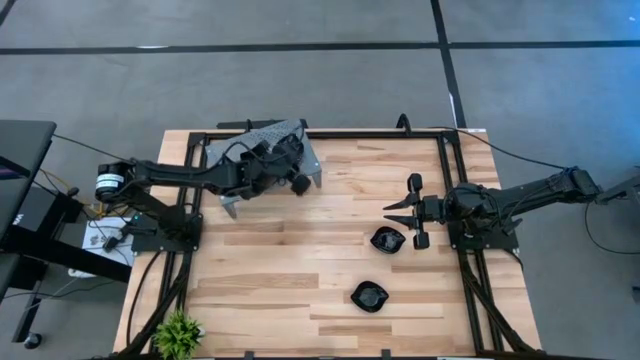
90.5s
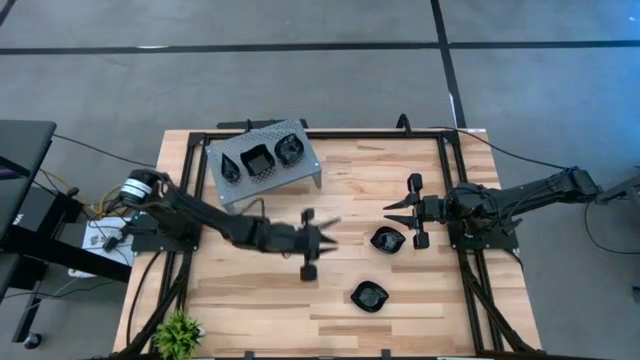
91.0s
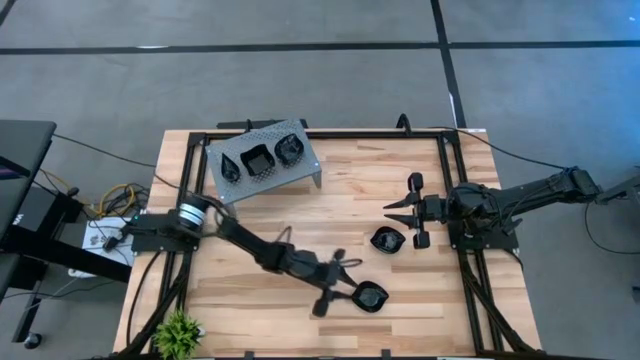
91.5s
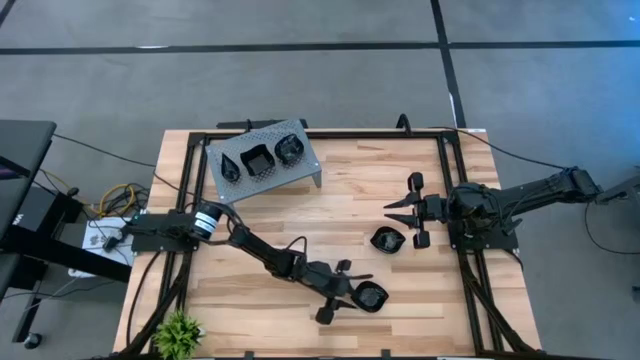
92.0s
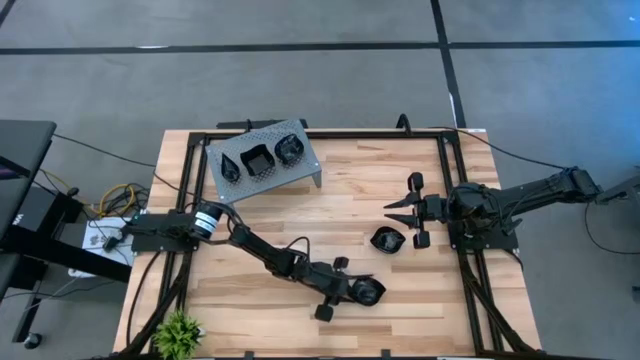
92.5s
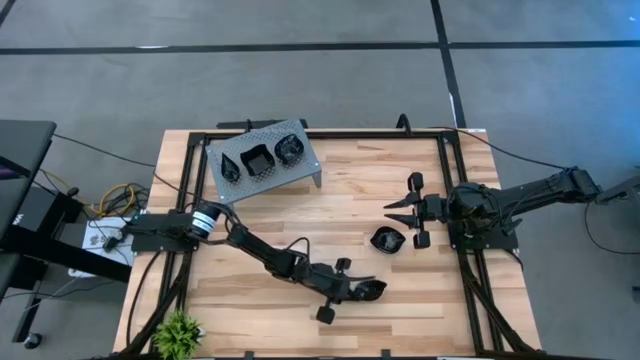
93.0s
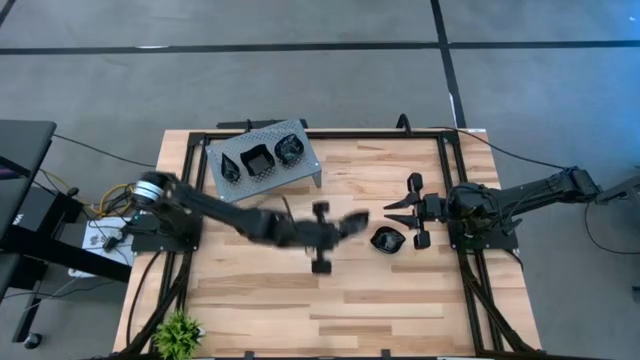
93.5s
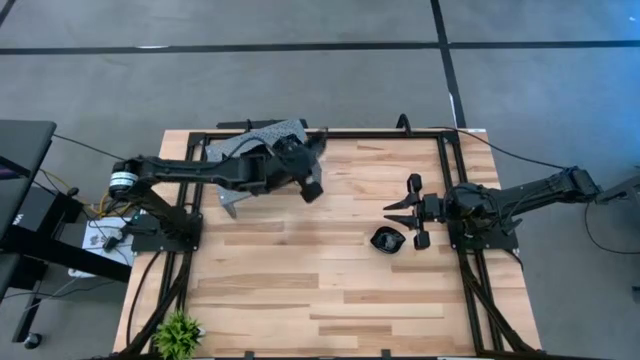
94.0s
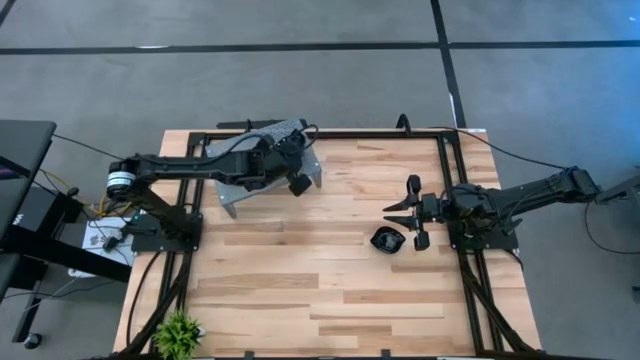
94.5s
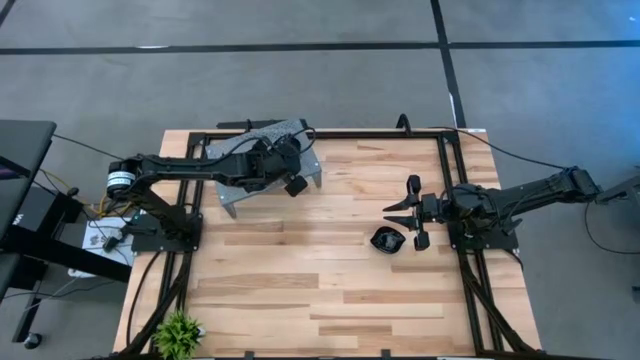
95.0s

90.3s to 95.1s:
Task: Pick & Place Mini shaped plates
Stack the black leaf plate on top of the black leaf plate on the shelf

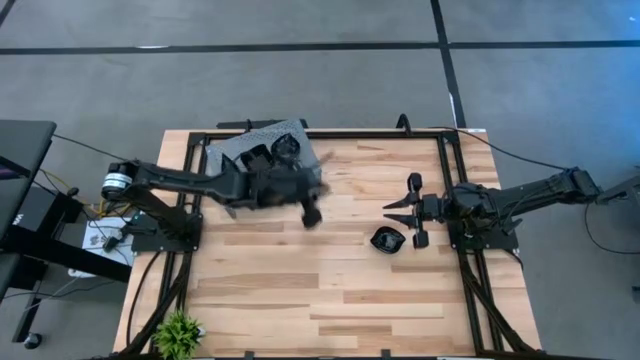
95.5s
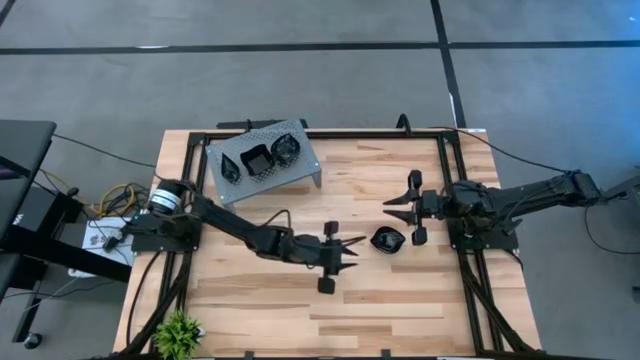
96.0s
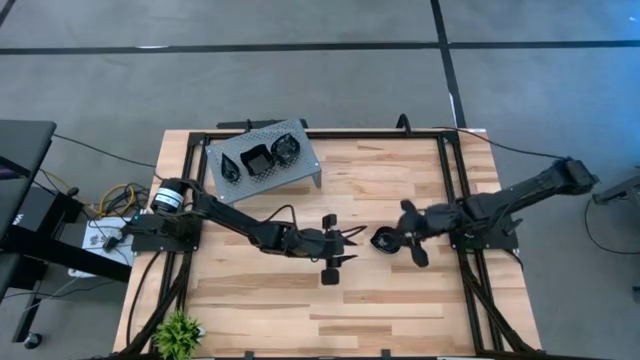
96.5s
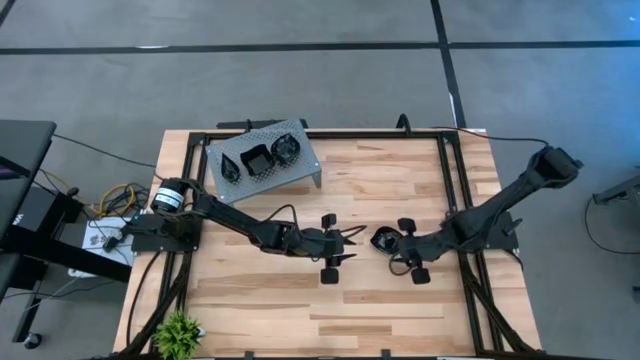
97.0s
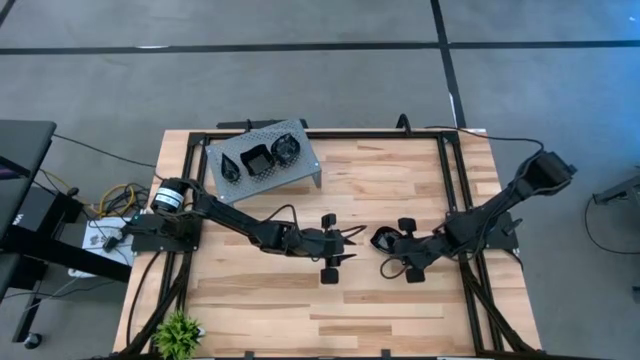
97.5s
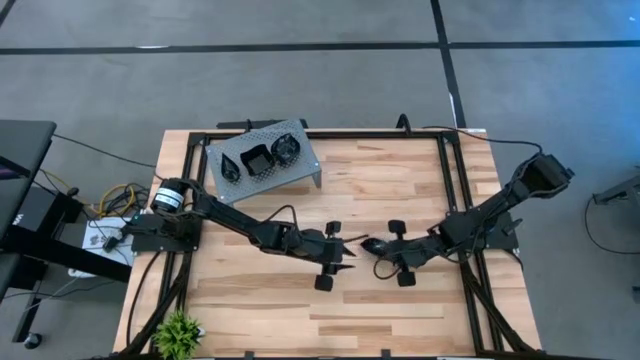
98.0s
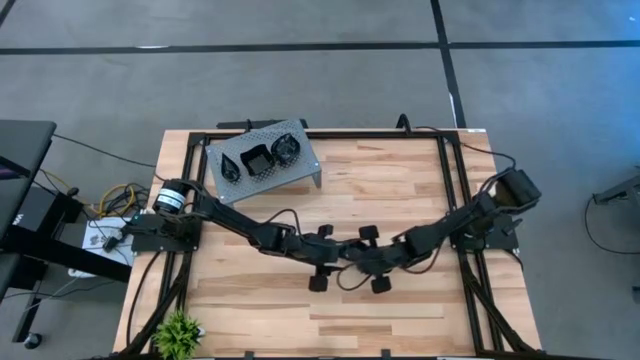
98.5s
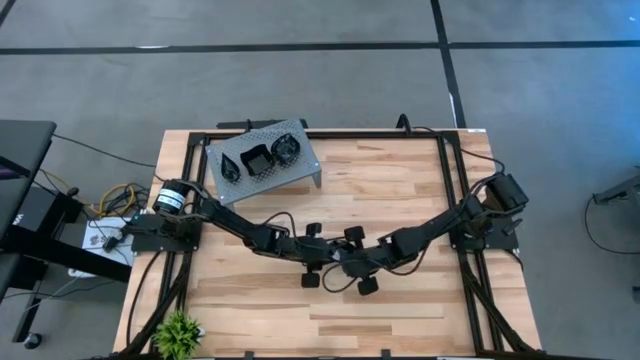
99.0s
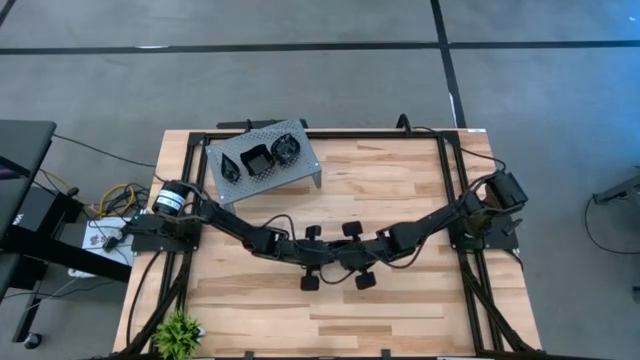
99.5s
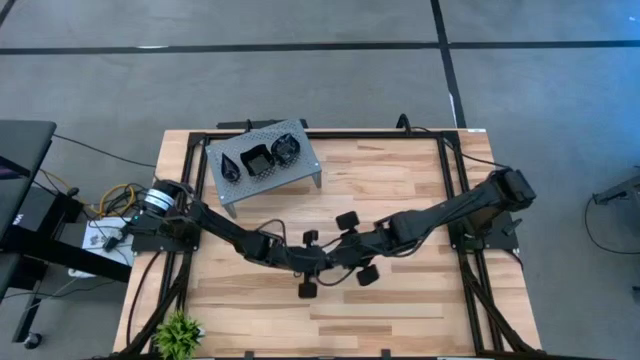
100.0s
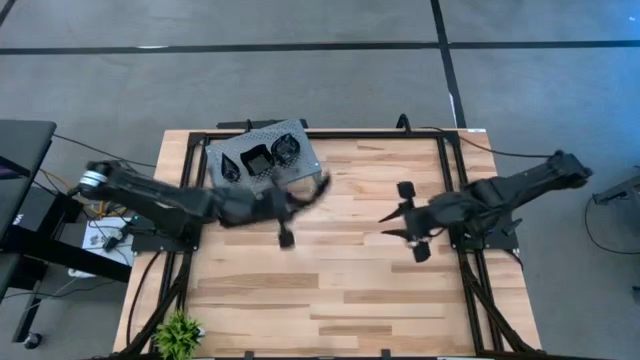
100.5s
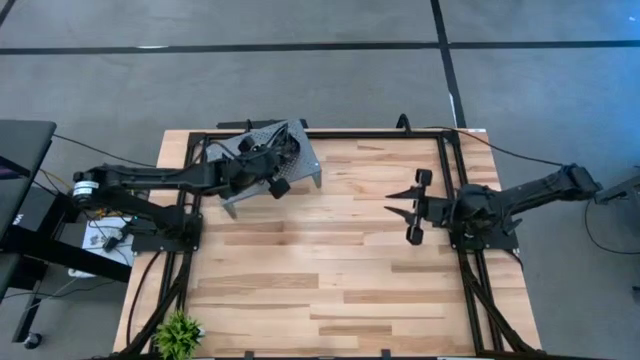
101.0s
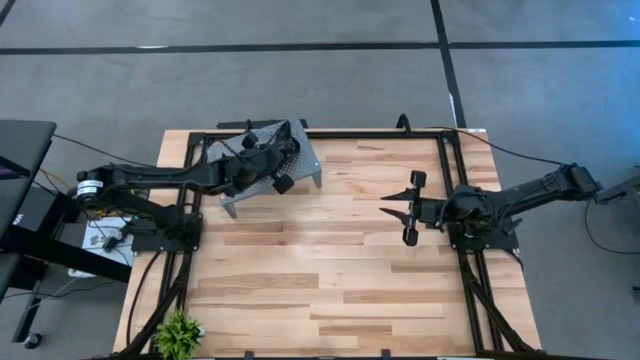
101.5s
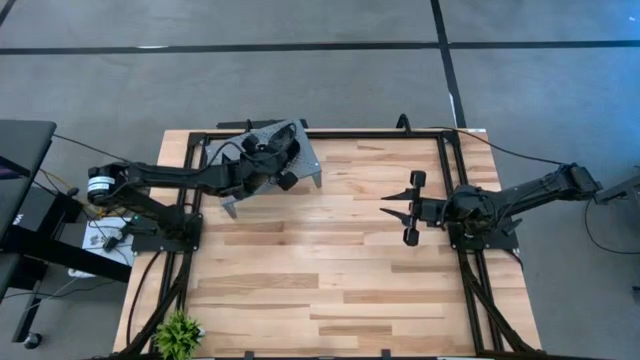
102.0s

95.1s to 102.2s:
Stack the black leaf plate on top of the black leaf plate on the shelf

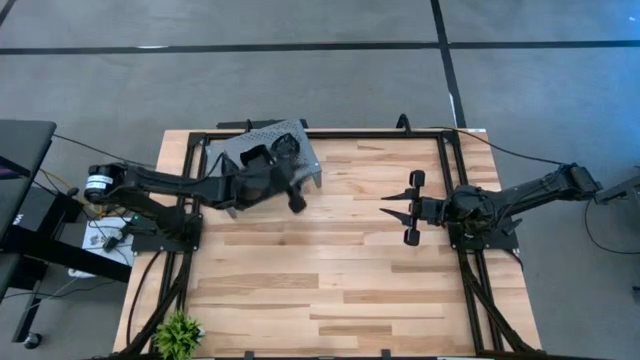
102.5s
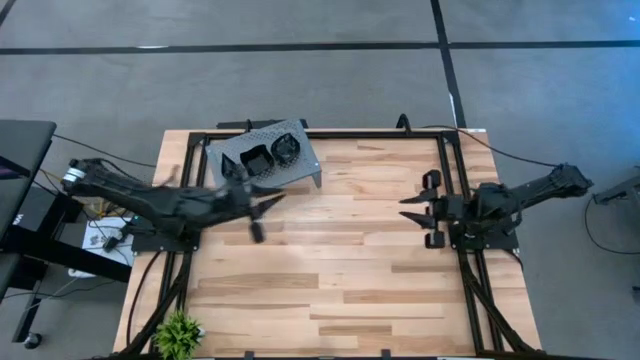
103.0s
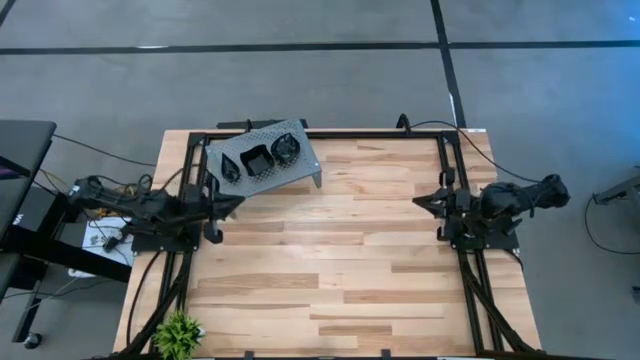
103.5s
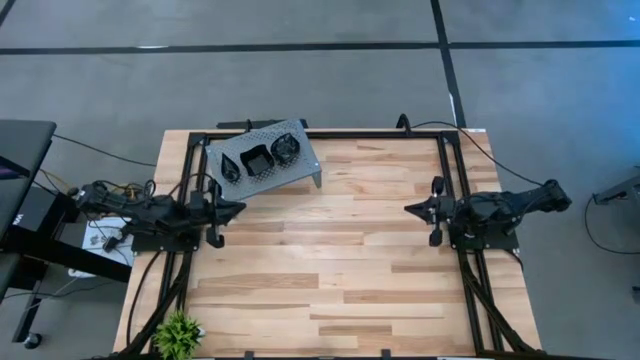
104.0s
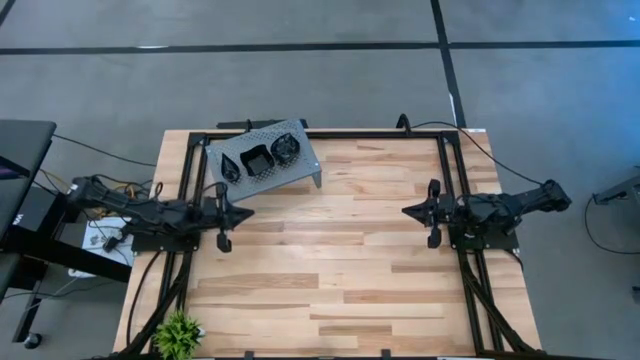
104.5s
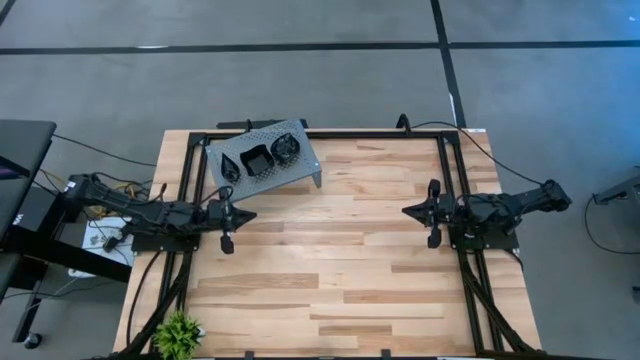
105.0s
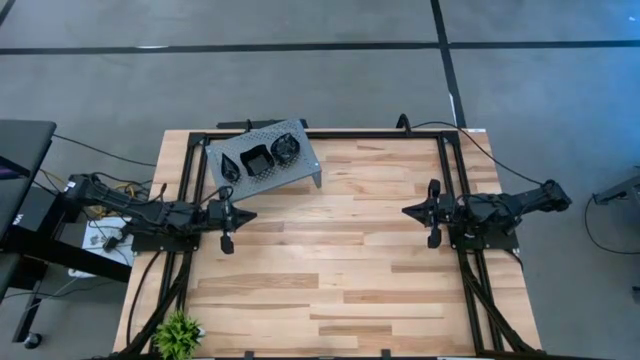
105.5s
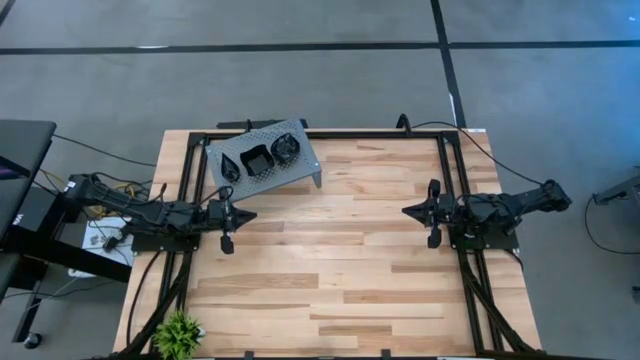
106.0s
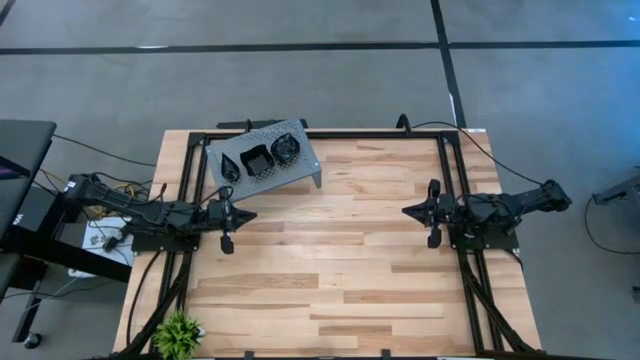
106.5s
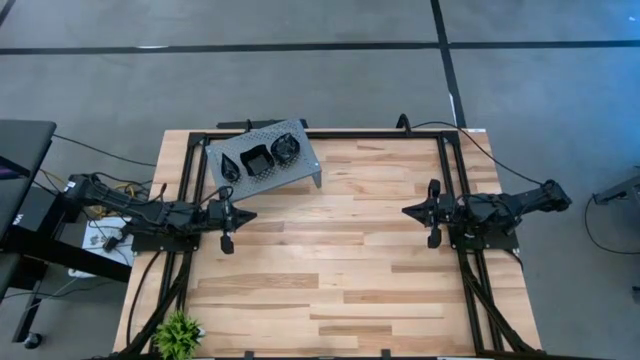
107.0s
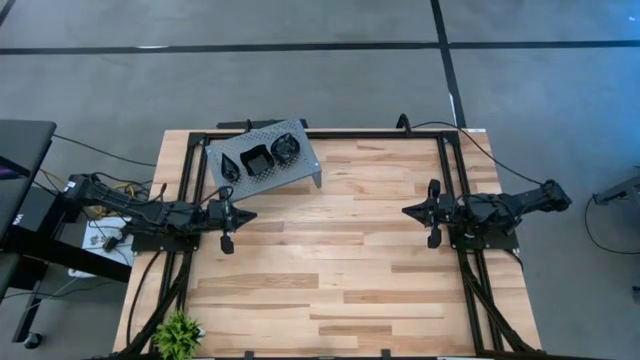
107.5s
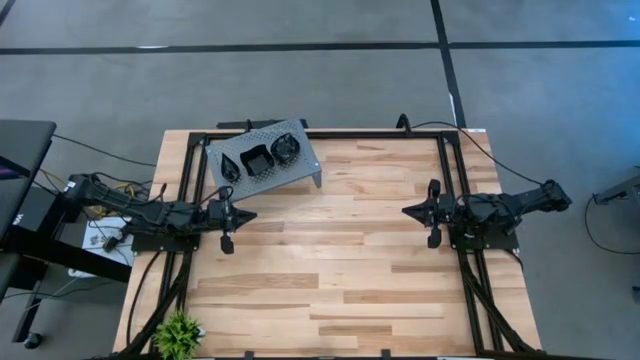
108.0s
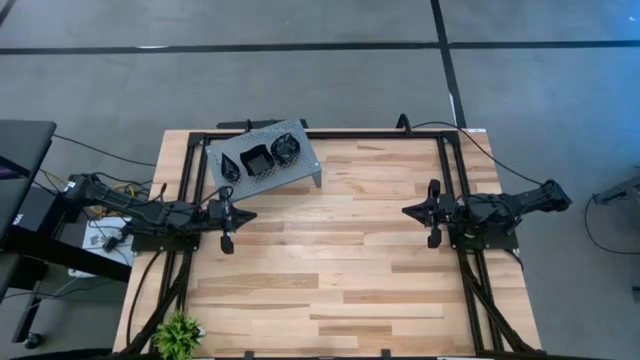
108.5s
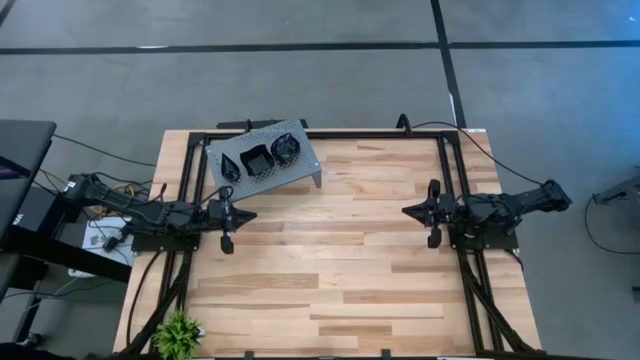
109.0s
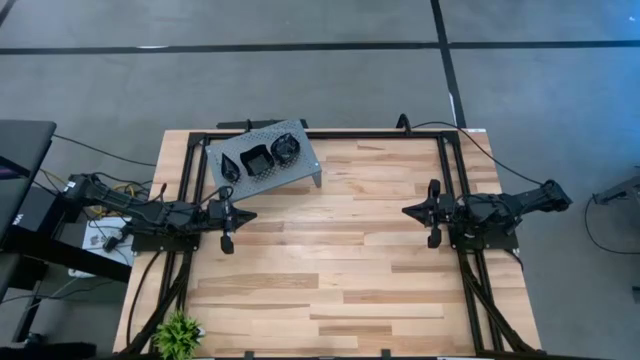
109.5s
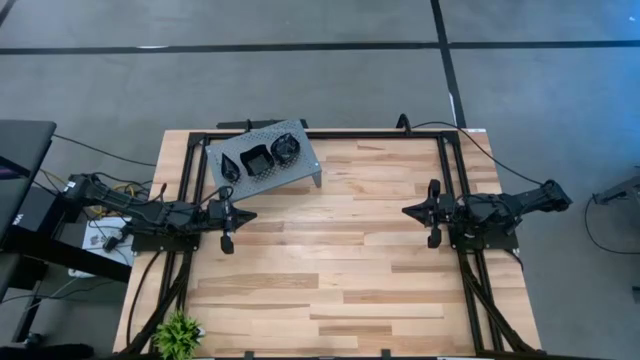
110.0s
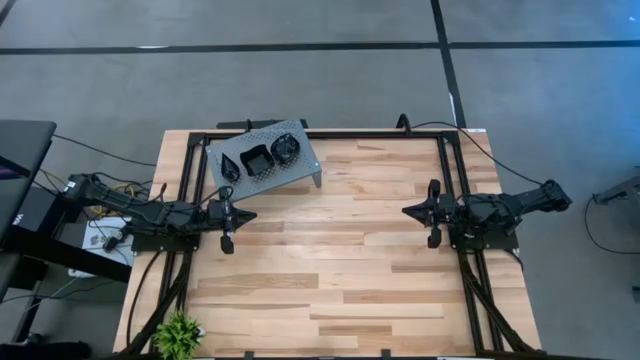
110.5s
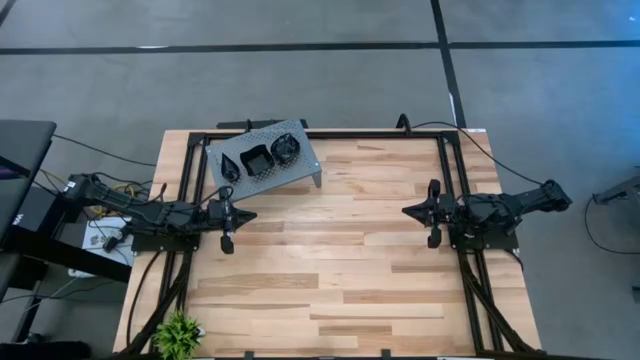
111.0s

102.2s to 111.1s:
Return to Home Position

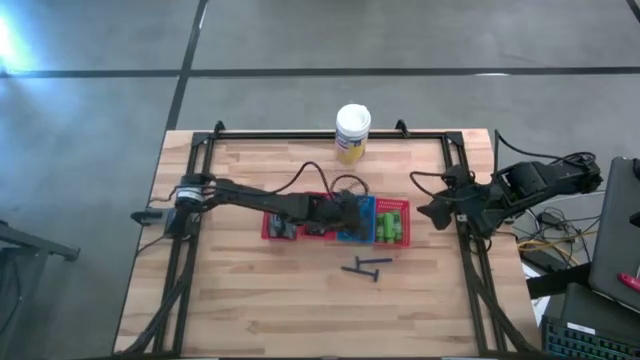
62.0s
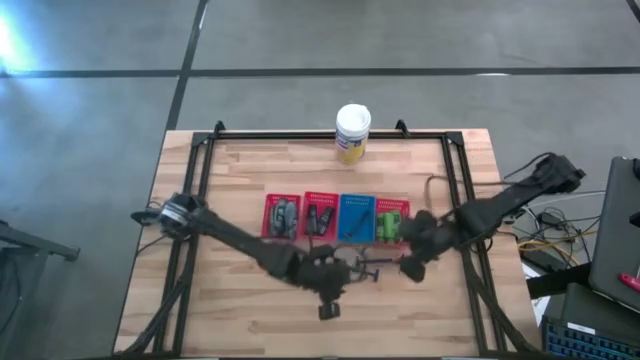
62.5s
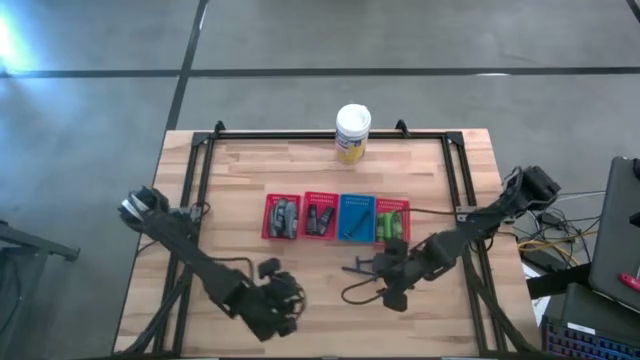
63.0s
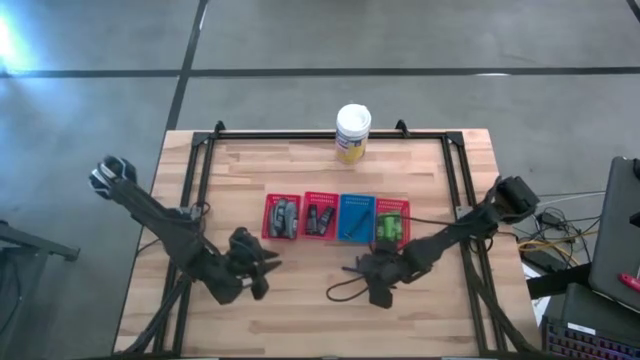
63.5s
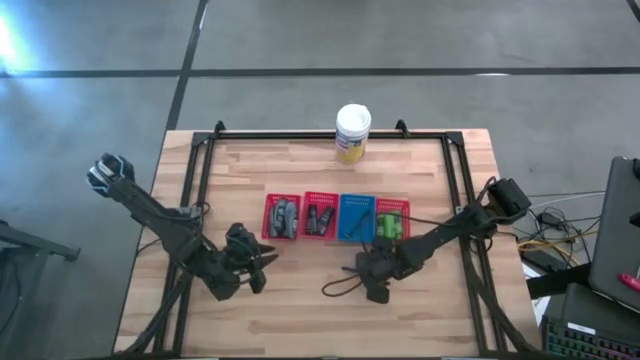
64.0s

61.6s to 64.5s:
Task: Pick & Place Travel size toiletries
Put the blue razor into the blue bin
